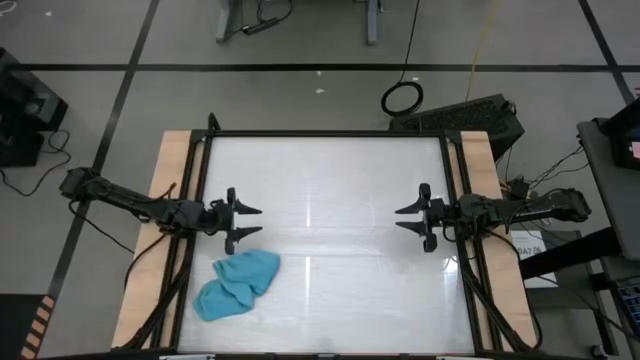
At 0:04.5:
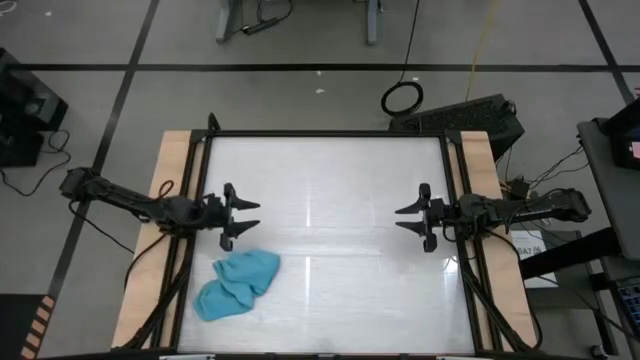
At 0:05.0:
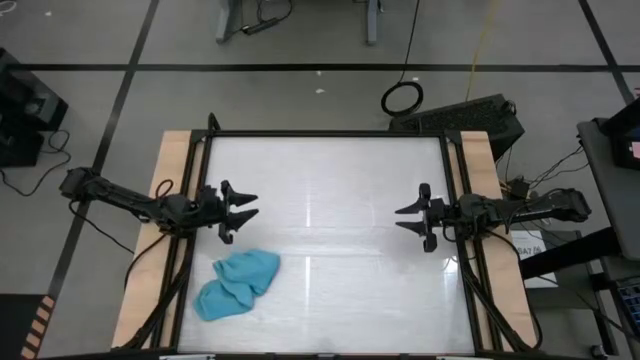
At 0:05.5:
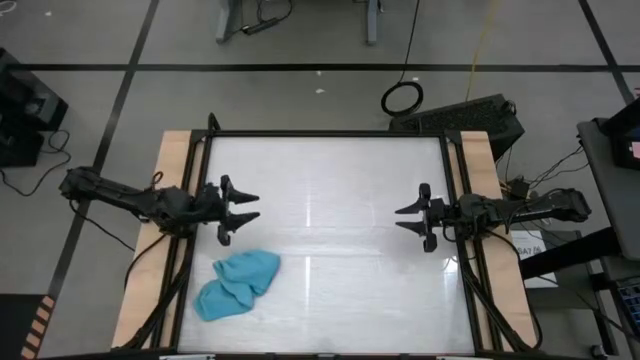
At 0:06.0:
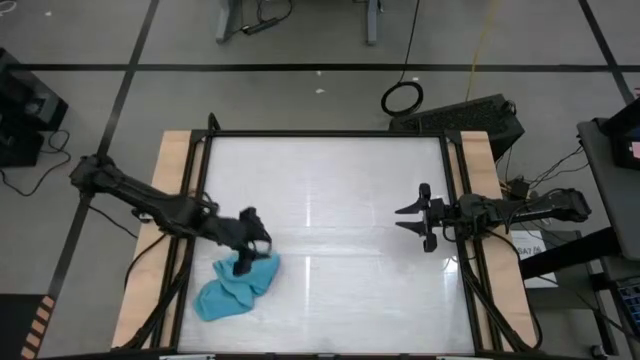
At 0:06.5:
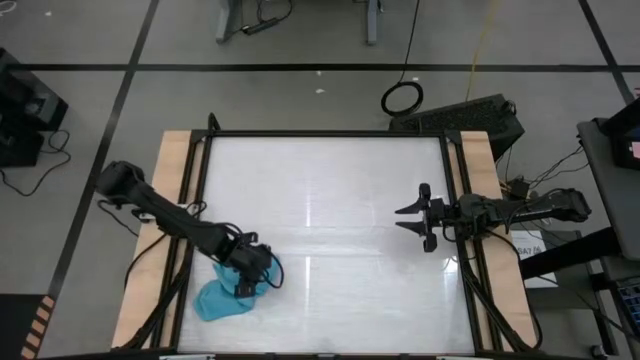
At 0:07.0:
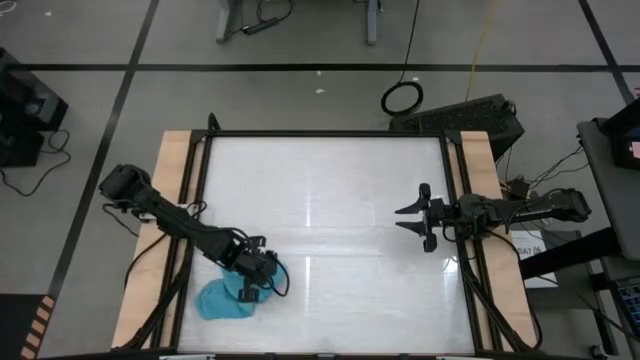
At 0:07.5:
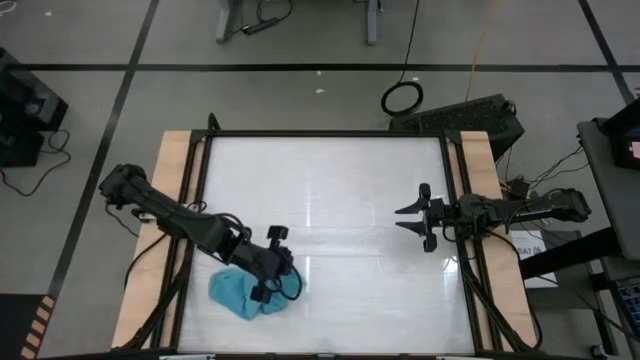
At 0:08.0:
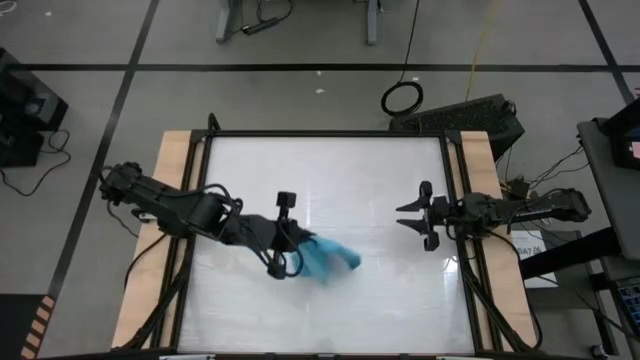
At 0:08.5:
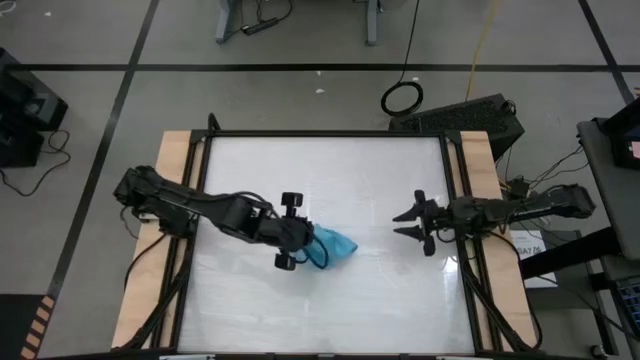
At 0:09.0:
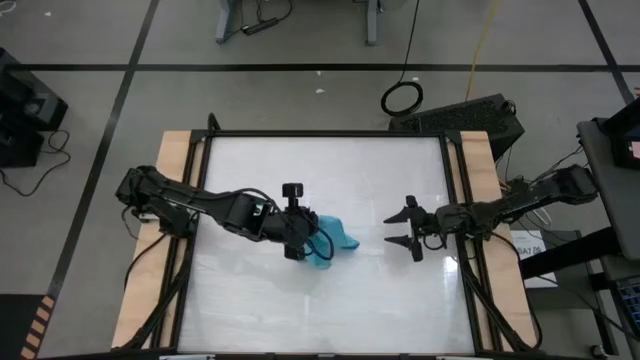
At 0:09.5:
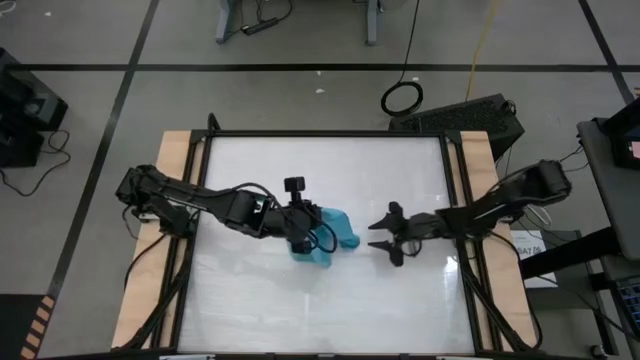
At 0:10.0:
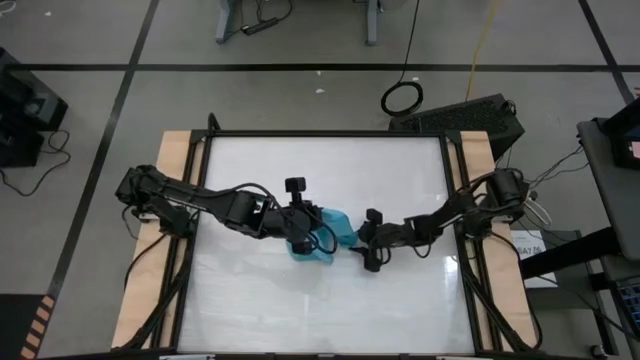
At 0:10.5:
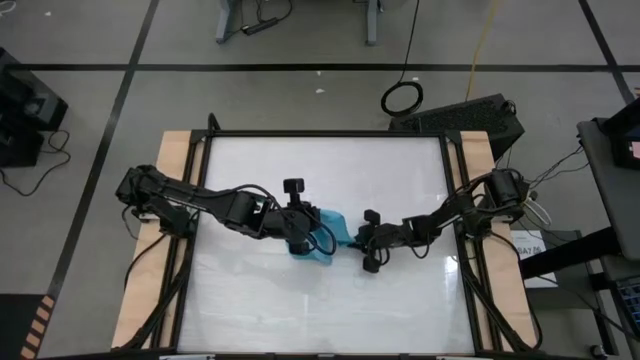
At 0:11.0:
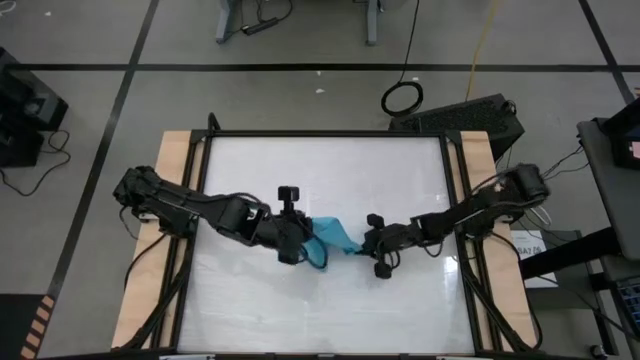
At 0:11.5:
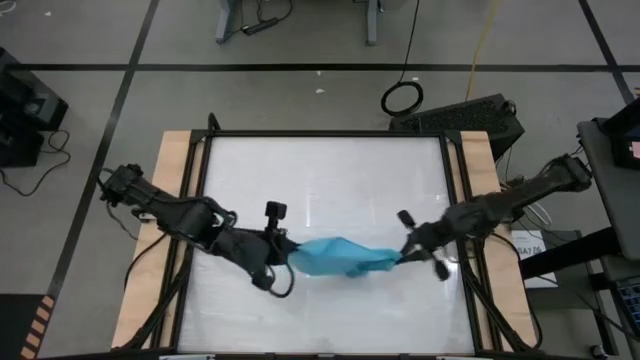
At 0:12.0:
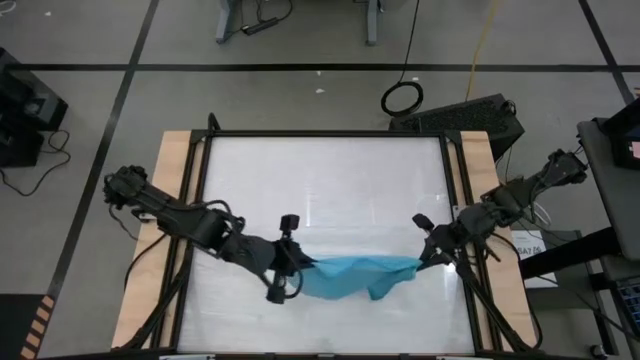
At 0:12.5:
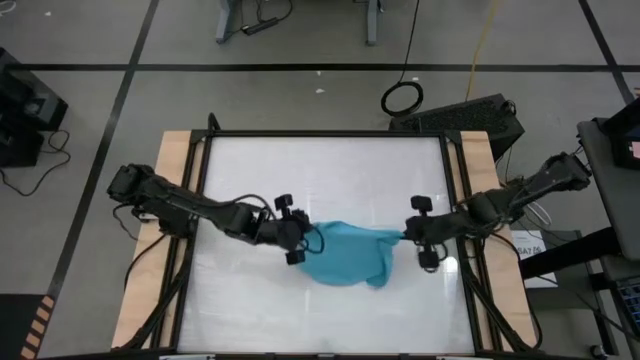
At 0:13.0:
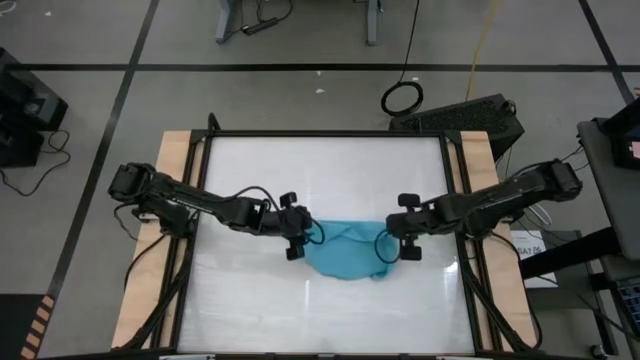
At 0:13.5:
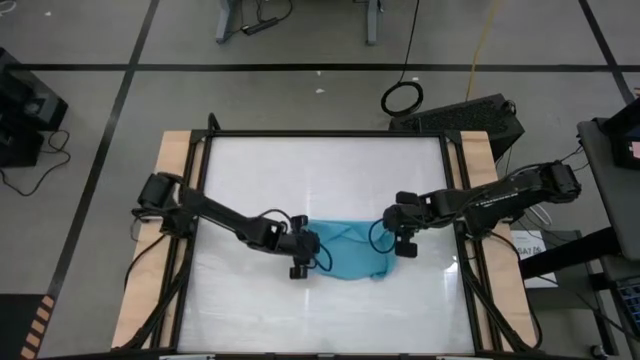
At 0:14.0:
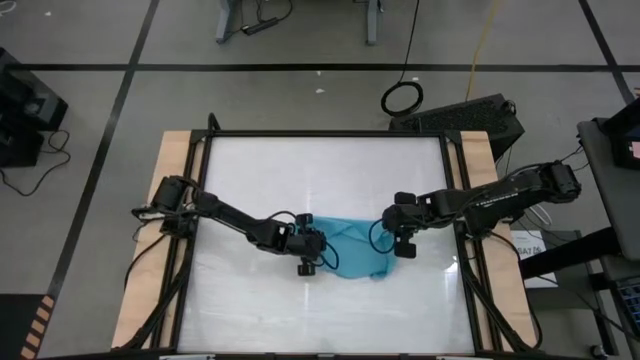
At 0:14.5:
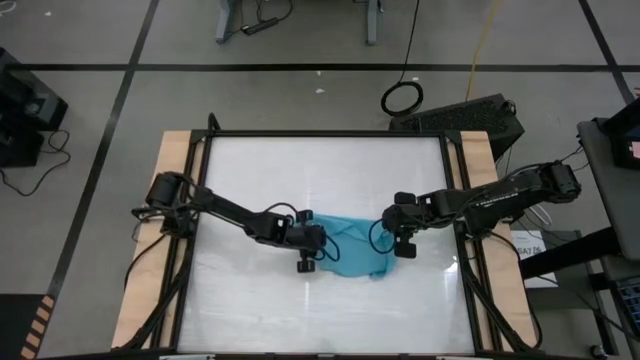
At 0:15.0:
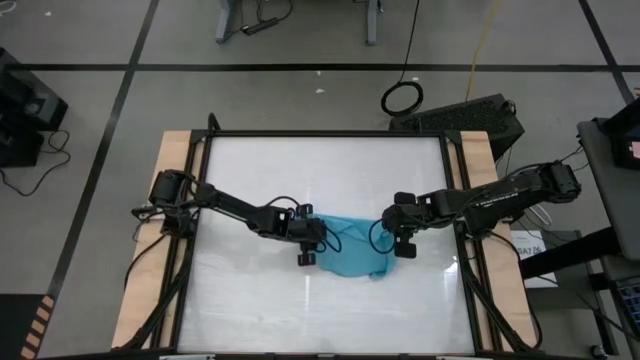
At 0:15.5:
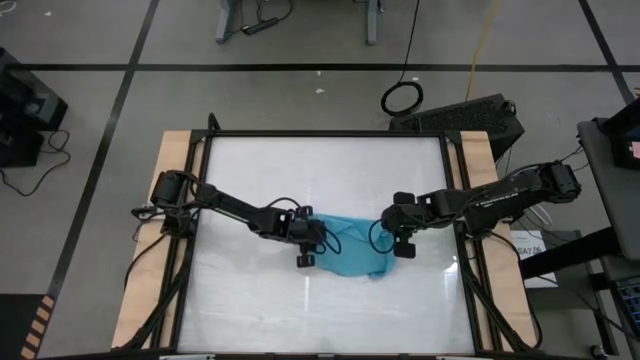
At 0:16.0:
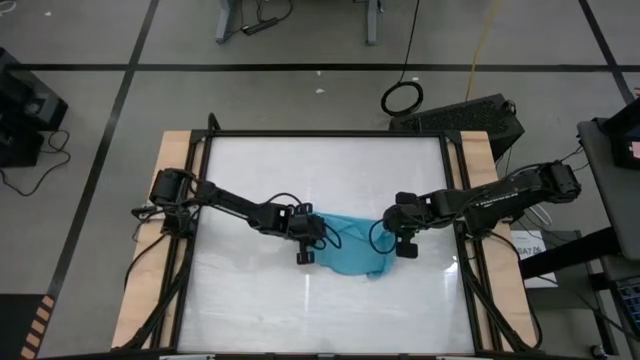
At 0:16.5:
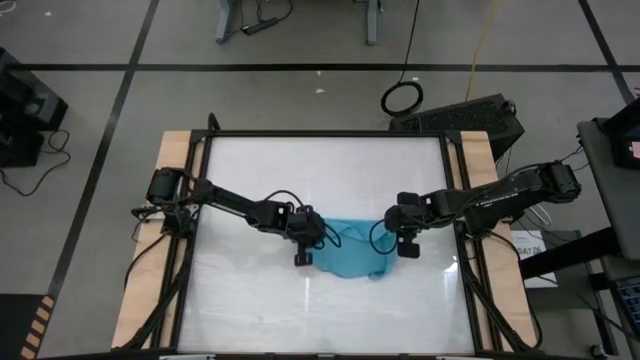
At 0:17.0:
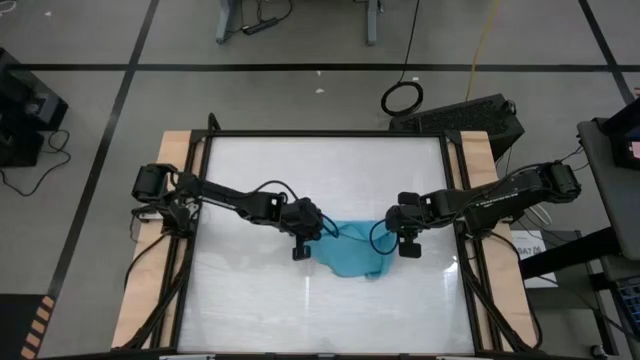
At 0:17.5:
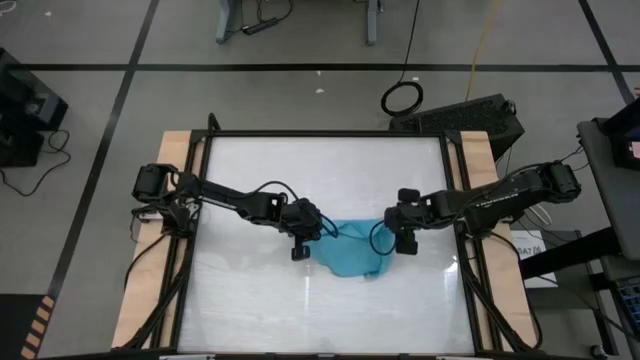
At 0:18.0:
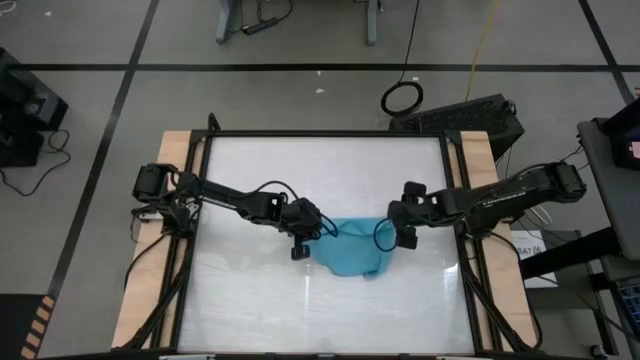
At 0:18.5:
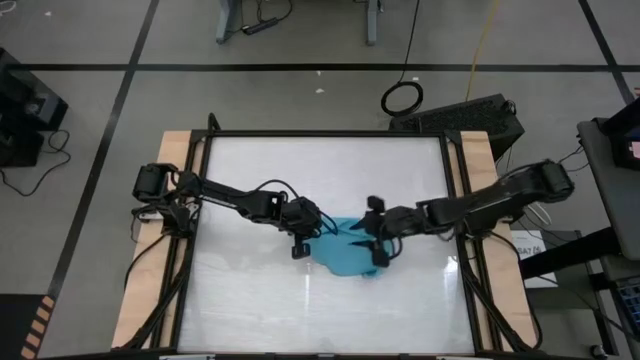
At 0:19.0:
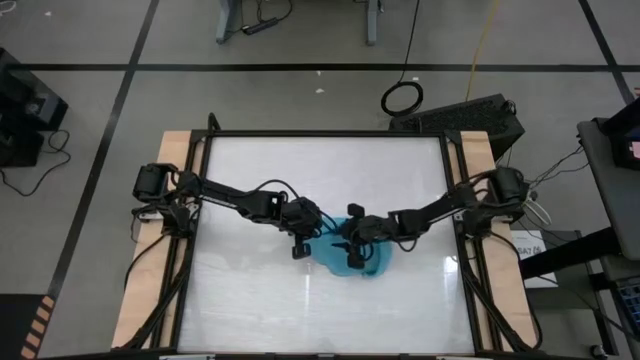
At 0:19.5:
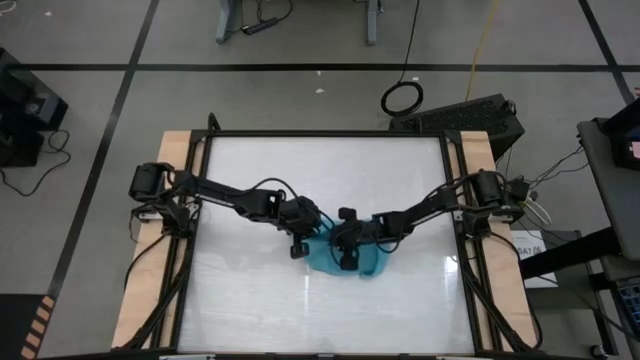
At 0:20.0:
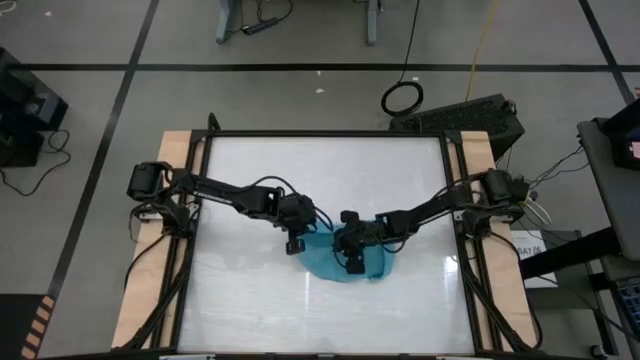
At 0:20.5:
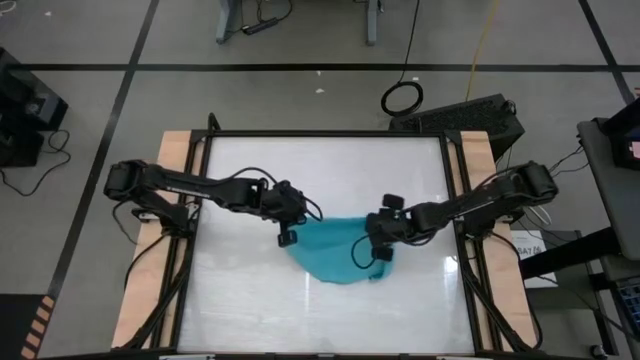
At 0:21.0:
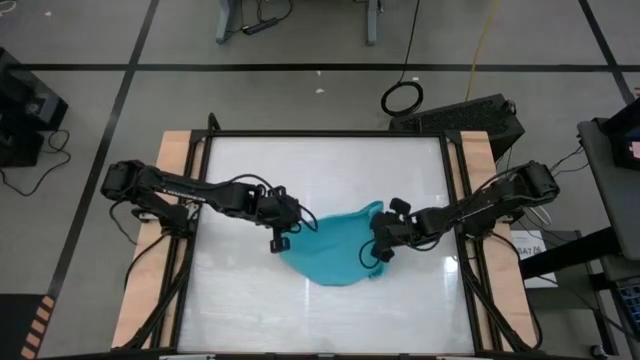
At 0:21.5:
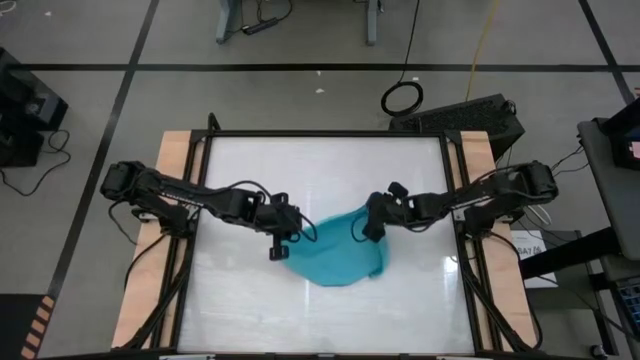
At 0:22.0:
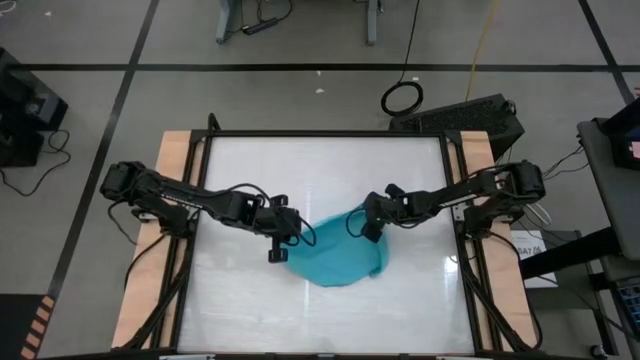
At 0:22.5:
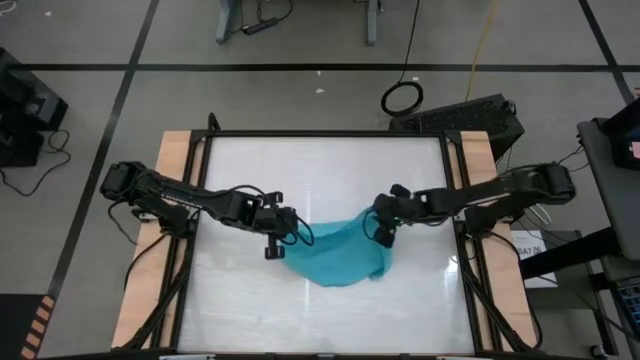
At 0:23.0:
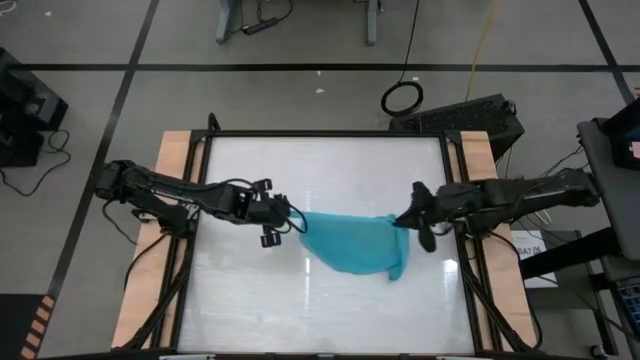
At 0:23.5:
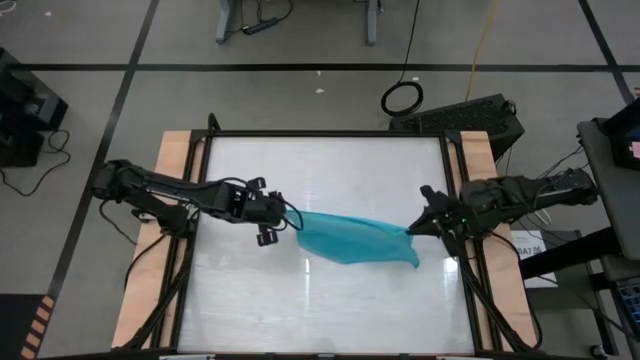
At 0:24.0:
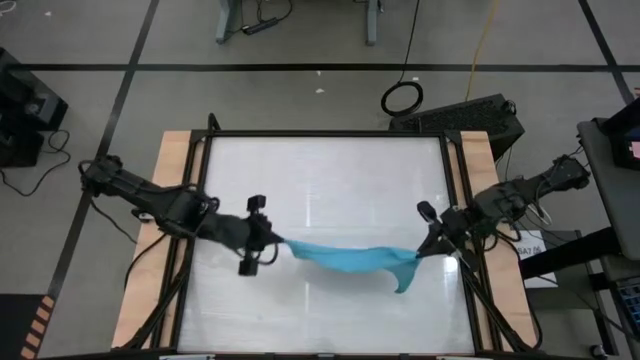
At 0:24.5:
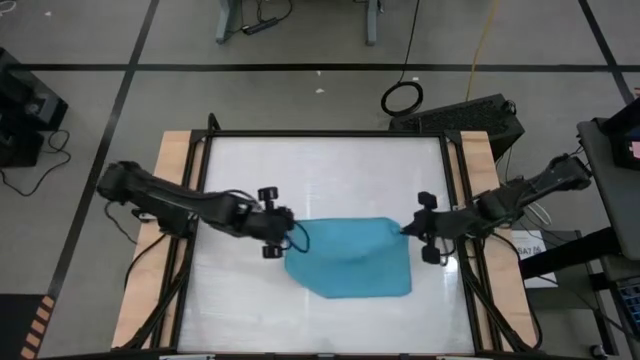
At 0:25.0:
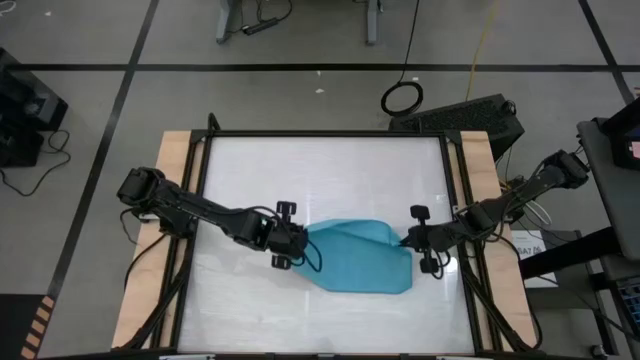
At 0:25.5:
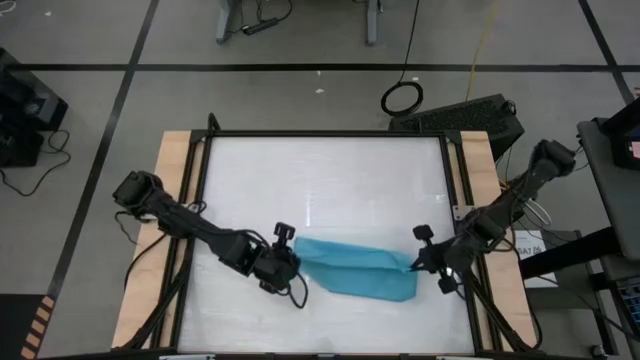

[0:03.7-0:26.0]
Task: Roll towel
Roll the blue microfiber cloth
